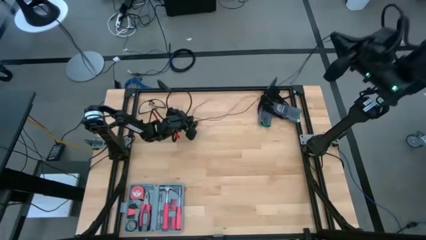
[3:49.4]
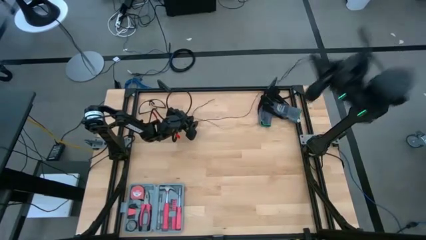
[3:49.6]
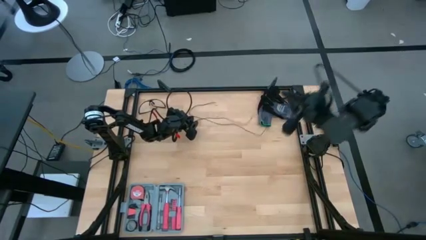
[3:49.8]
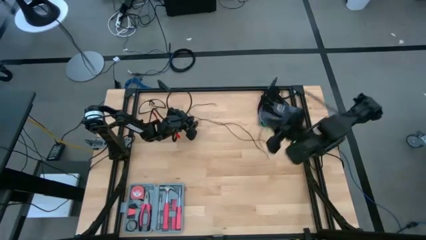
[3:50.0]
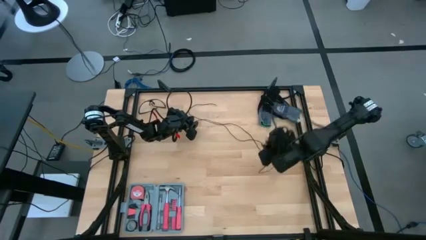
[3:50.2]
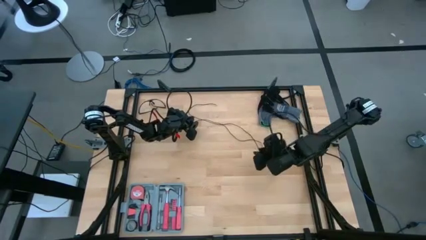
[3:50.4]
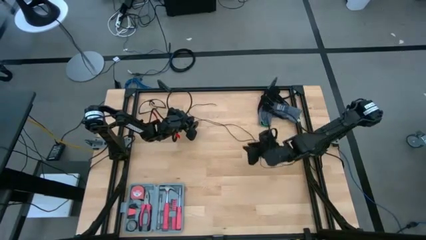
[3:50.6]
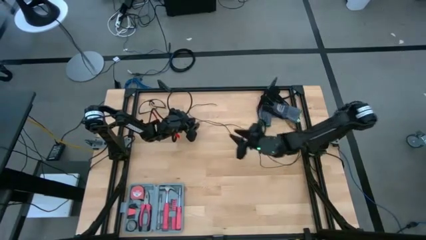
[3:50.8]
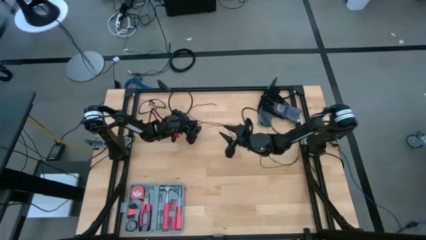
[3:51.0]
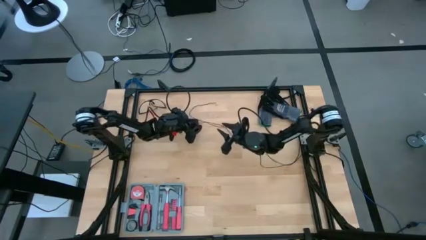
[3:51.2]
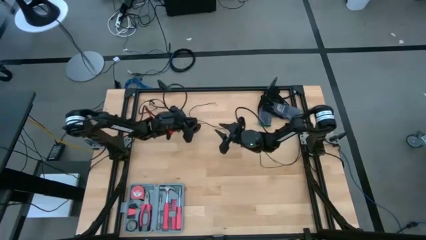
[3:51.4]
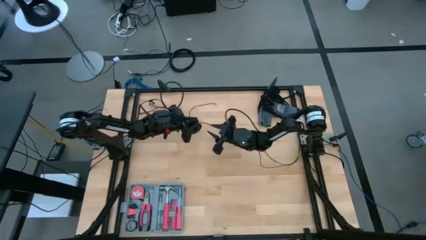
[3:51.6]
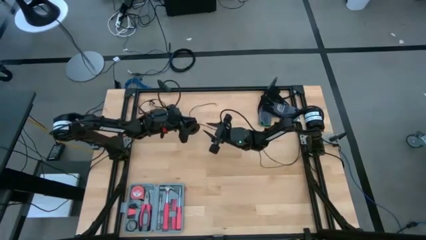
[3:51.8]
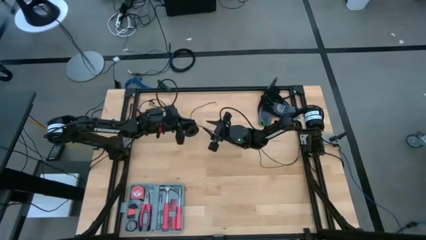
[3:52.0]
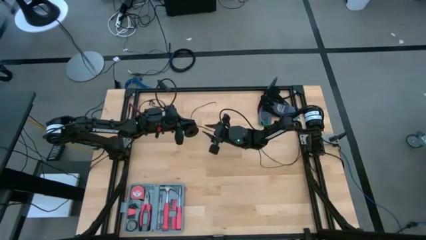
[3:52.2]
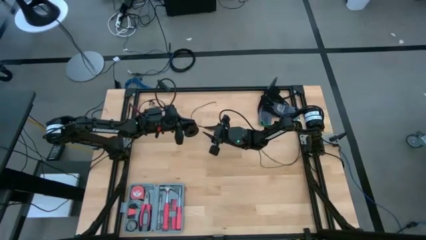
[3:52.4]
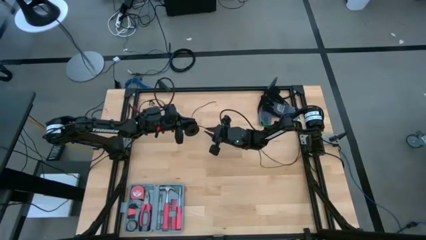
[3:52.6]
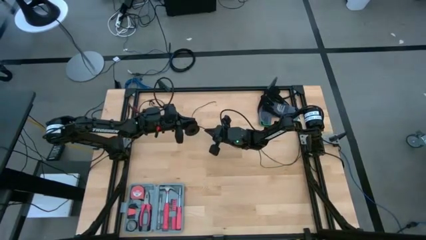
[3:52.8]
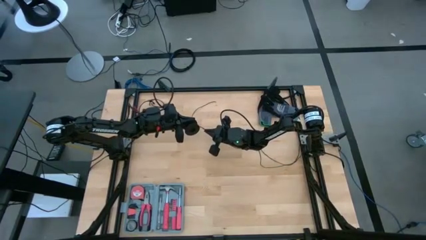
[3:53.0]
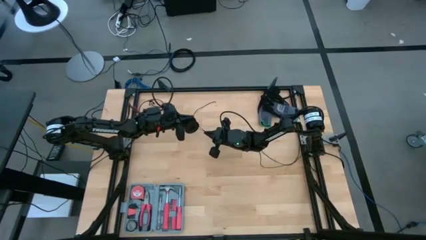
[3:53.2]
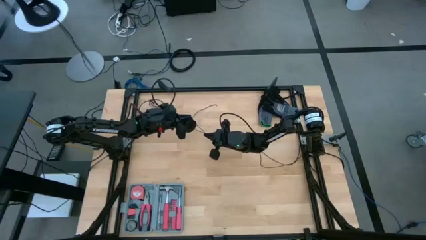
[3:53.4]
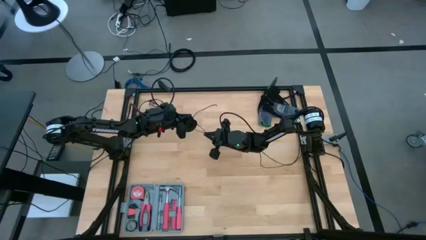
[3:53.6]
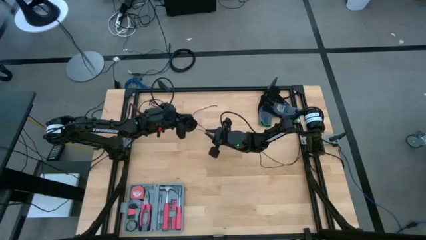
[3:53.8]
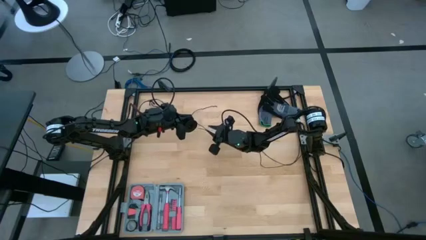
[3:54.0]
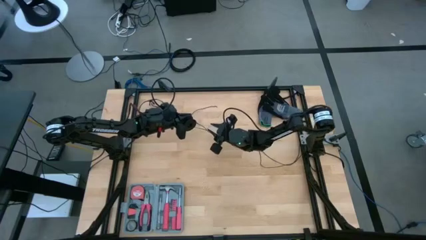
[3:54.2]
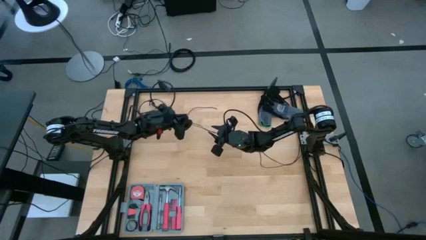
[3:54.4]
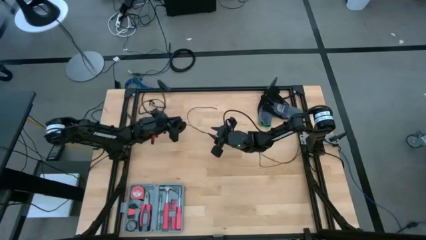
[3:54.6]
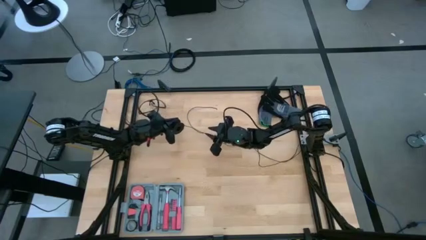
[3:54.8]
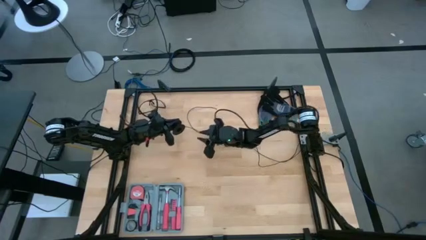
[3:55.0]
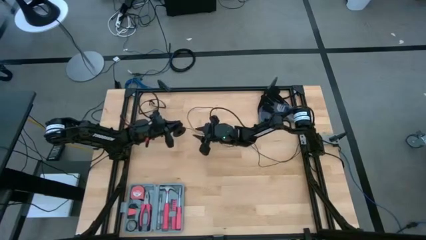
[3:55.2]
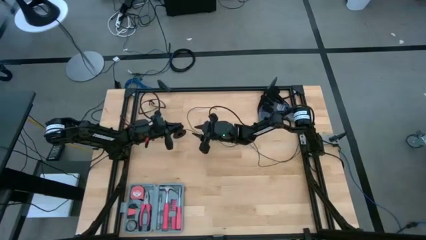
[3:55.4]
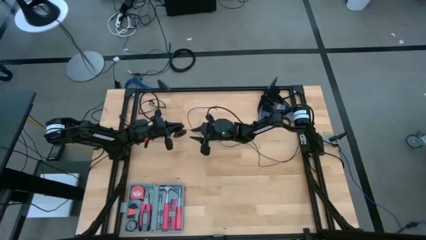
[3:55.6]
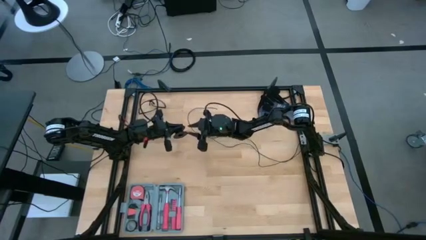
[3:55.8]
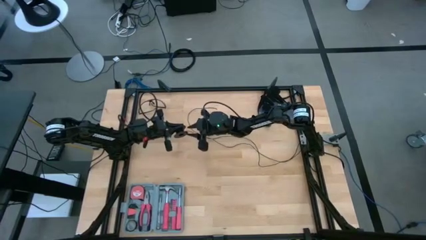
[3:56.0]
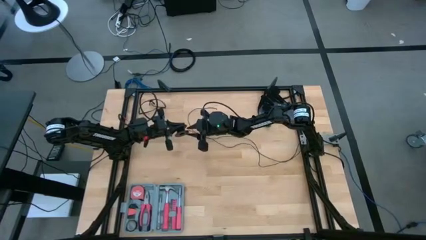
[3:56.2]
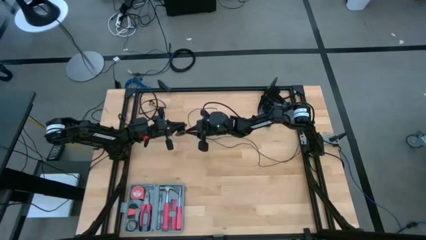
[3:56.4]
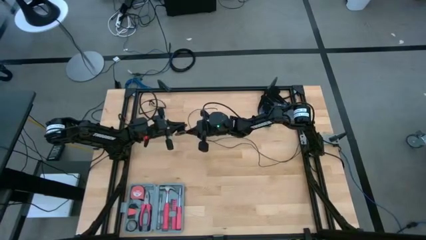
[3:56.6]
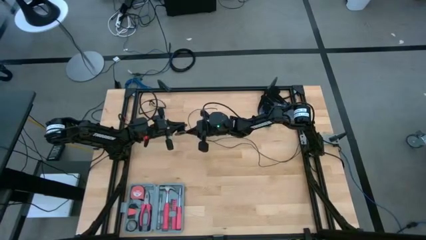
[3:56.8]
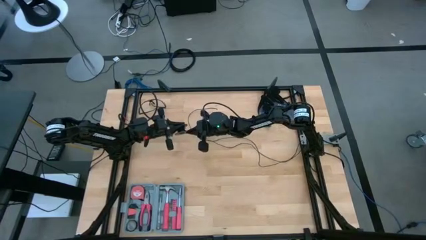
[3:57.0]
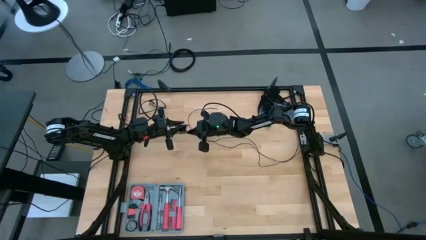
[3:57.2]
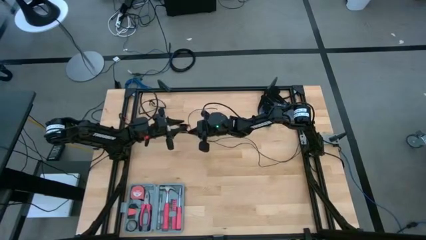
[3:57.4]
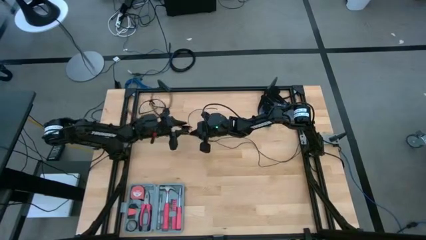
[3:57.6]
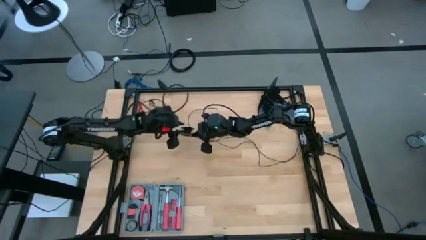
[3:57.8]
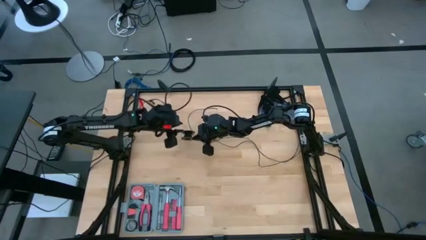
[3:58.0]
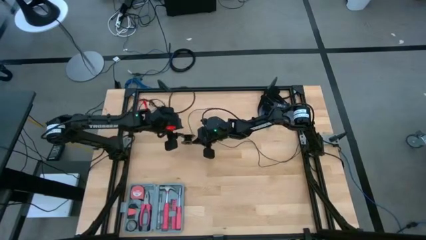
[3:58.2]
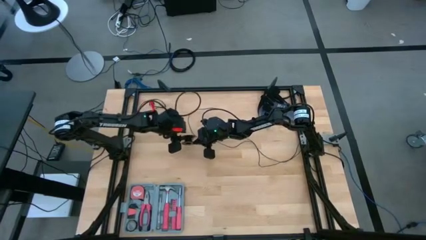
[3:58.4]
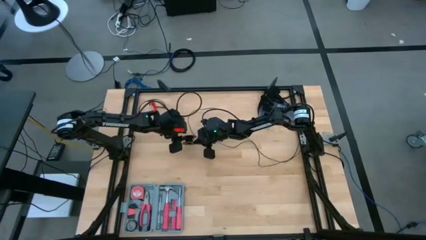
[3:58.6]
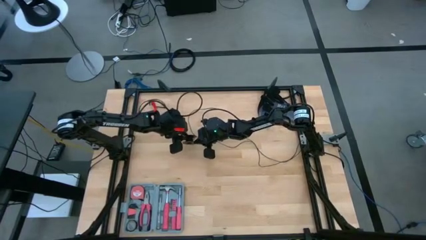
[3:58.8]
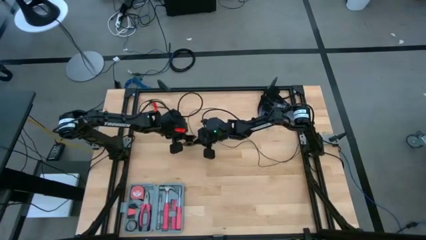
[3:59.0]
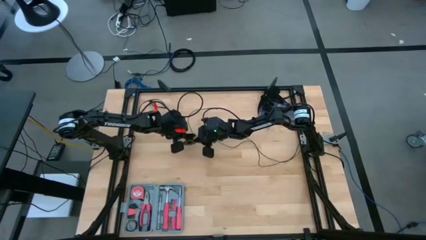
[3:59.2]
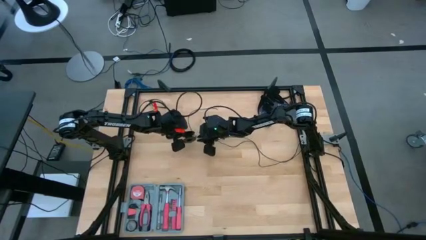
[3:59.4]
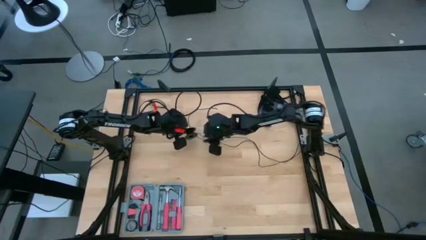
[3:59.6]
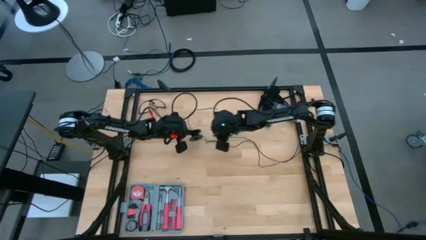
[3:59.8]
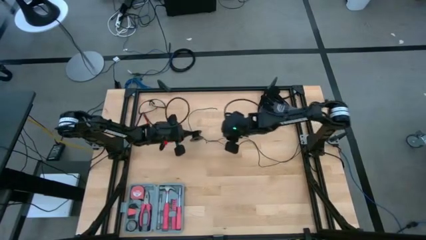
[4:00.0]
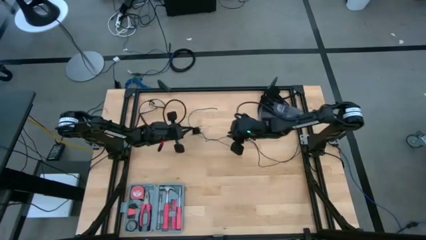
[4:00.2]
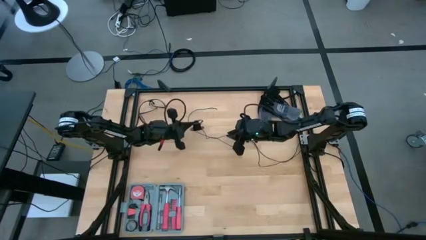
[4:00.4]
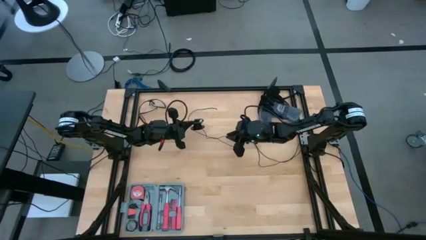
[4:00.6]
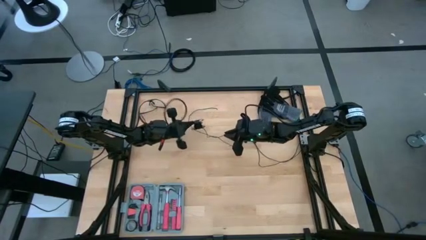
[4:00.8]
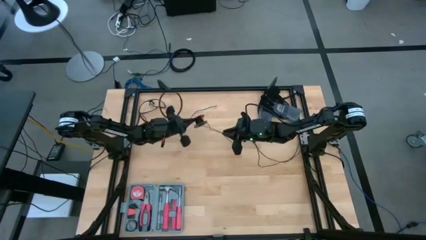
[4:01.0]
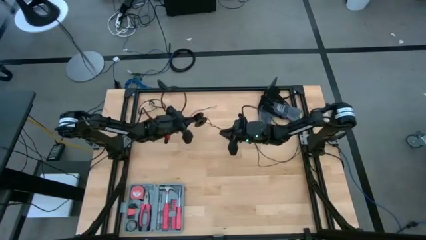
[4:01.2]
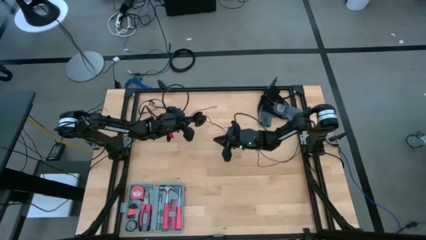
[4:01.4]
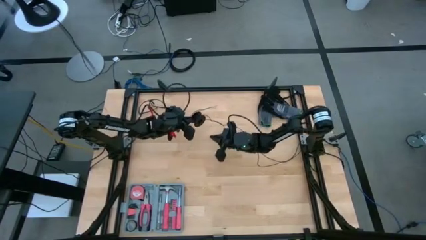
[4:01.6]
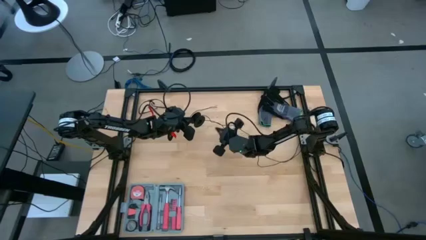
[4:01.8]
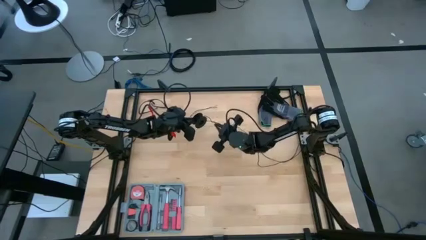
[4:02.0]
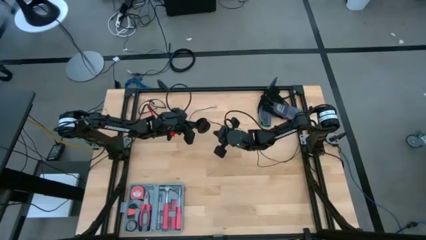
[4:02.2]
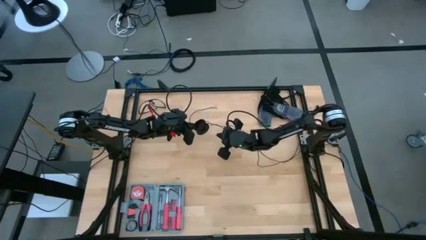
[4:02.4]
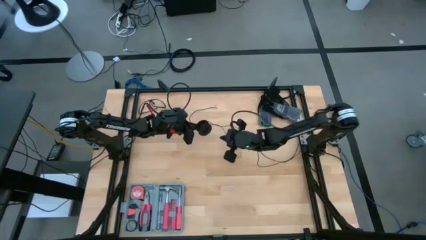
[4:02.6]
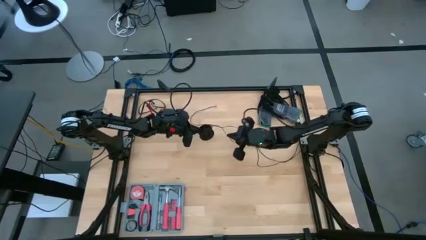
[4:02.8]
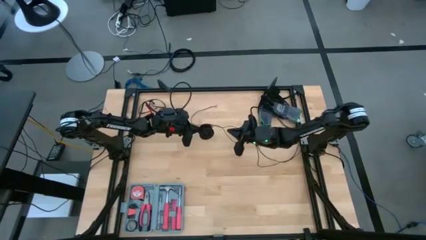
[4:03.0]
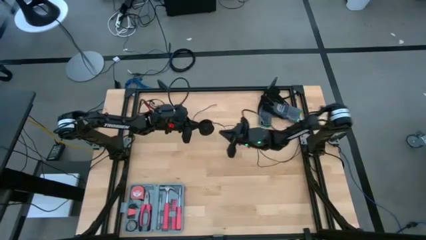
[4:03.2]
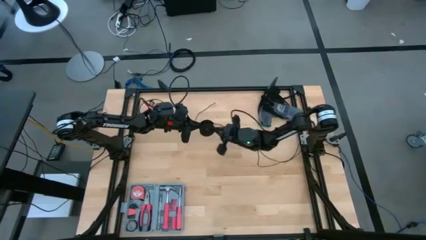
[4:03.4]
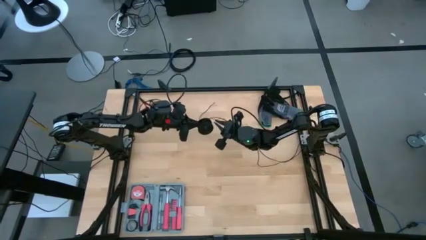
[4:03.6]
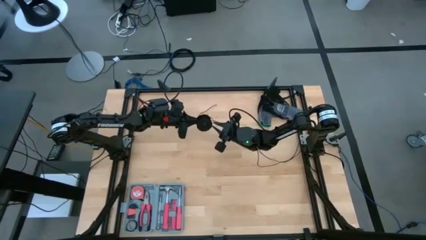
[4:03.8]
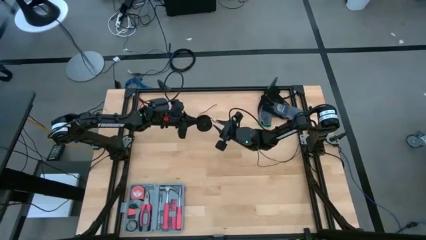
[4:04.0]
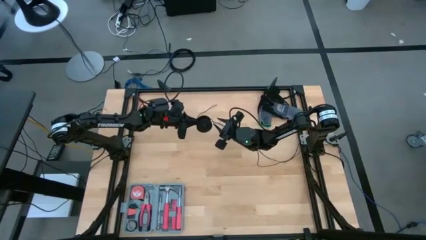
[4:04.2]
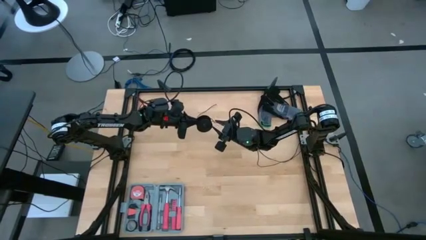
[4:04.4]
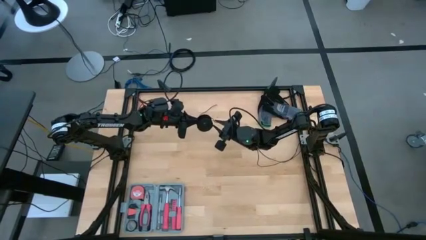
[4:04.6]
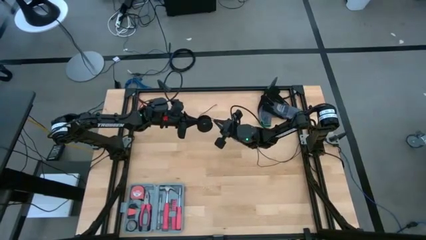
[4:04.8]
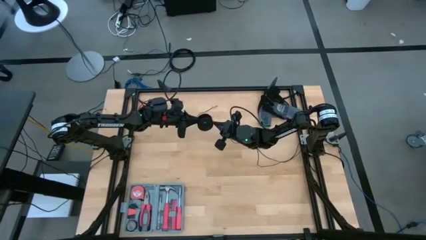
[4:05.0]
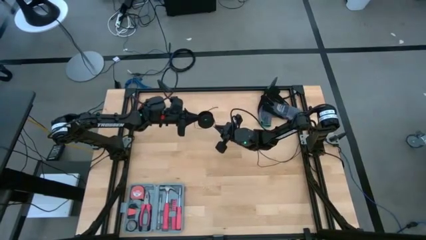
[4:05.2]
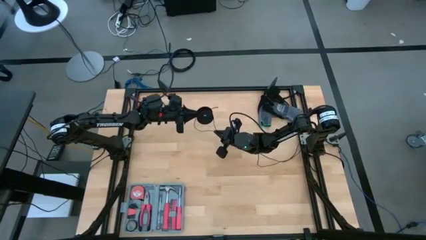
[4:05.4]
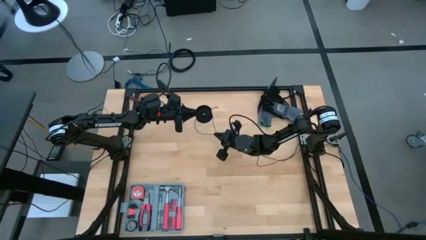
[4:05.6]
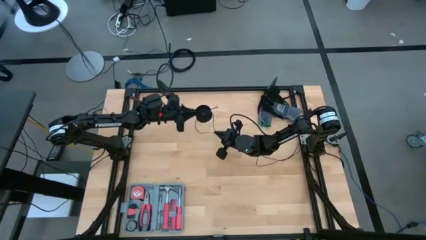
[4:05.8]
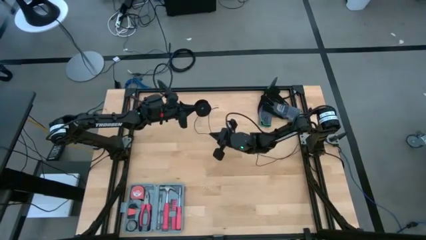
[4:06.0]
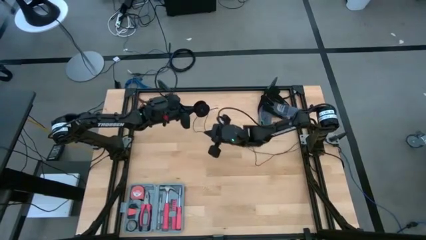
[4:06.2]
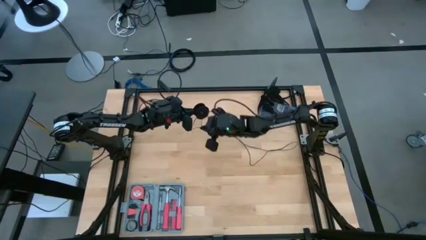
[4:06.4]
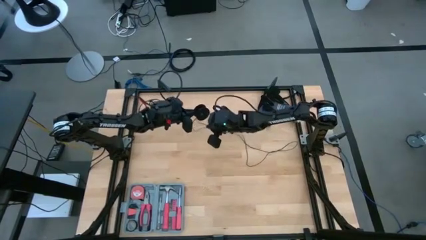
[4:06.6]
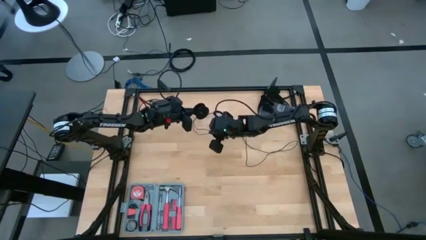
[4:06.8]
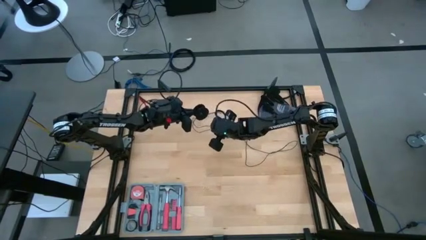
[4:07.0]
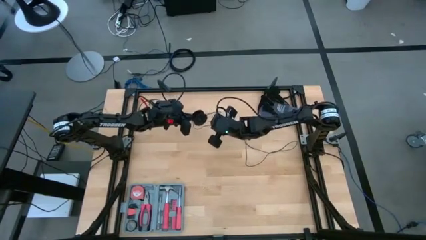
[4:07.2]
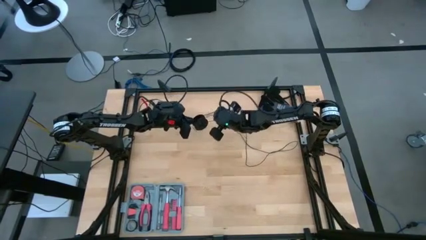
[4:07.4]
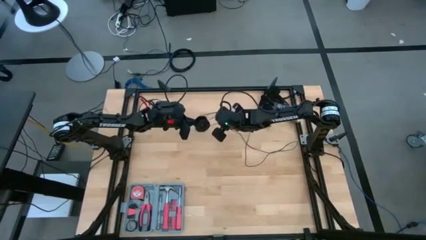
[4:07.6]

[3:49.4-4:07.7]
Task: Coil cords
Coil the black wire onto the black spool
